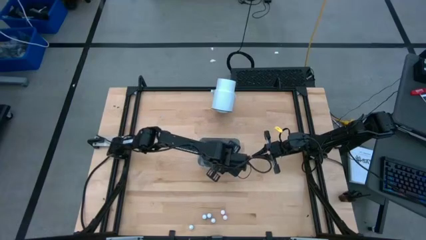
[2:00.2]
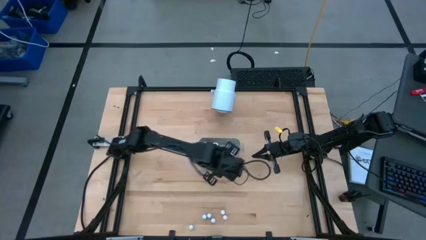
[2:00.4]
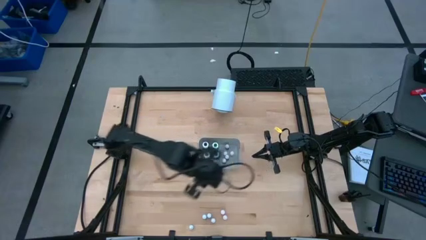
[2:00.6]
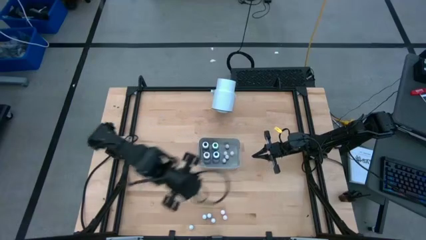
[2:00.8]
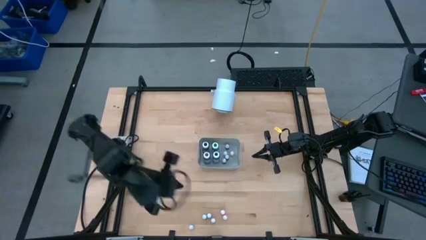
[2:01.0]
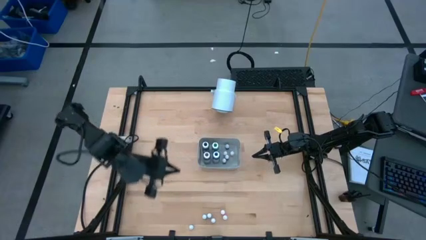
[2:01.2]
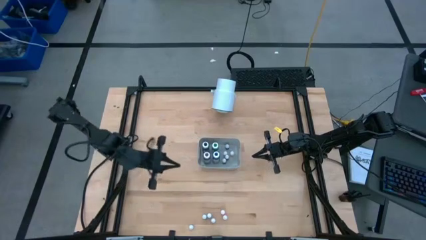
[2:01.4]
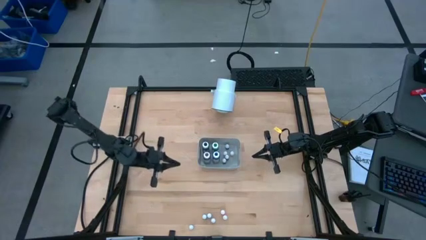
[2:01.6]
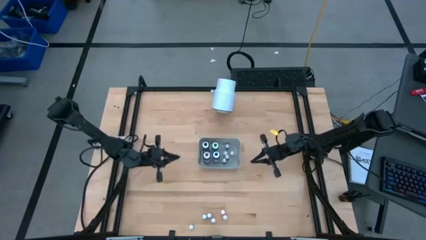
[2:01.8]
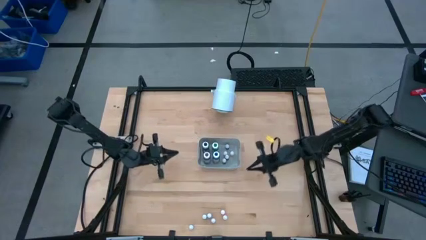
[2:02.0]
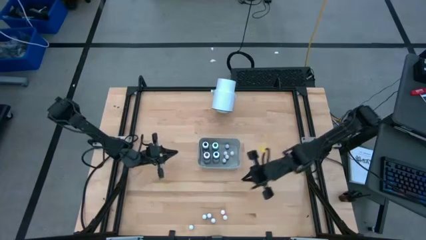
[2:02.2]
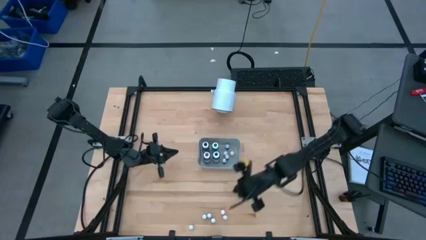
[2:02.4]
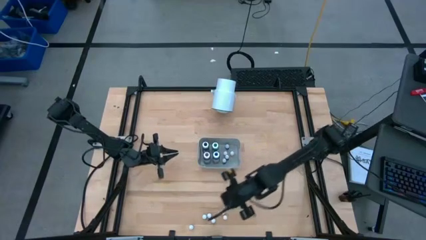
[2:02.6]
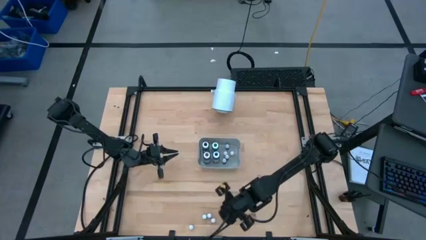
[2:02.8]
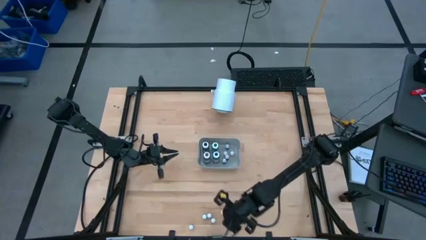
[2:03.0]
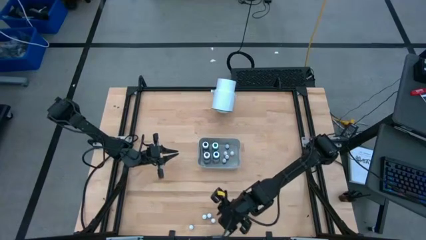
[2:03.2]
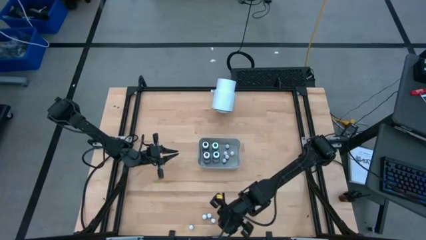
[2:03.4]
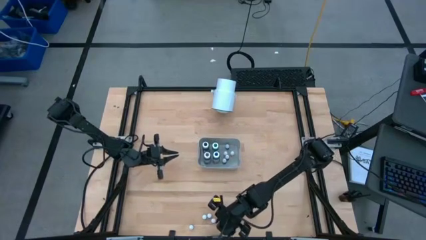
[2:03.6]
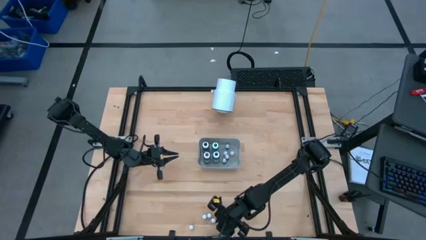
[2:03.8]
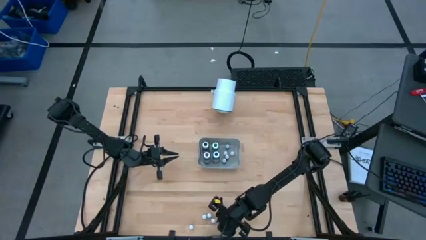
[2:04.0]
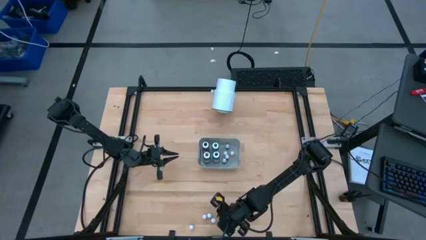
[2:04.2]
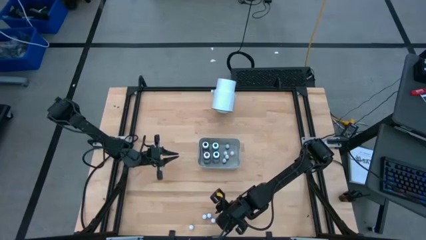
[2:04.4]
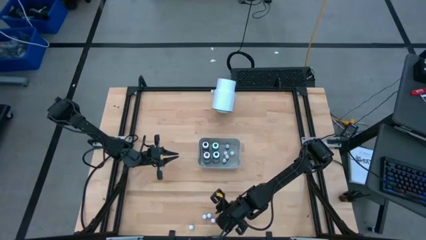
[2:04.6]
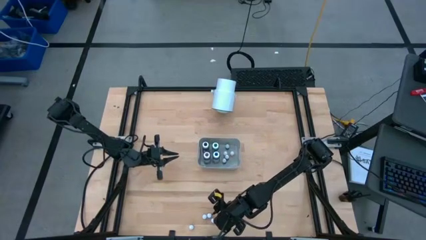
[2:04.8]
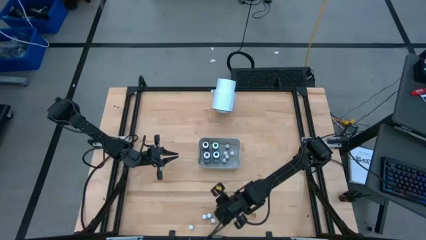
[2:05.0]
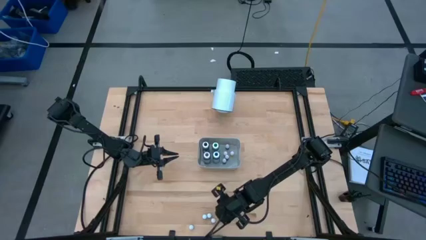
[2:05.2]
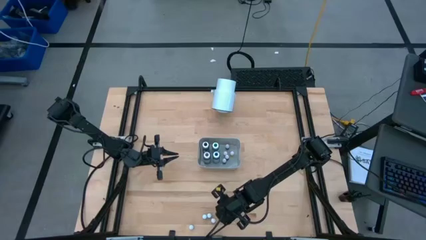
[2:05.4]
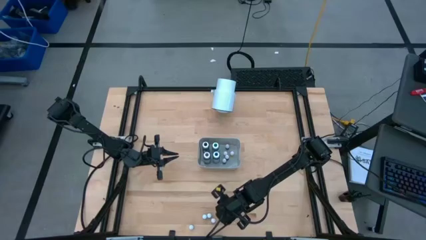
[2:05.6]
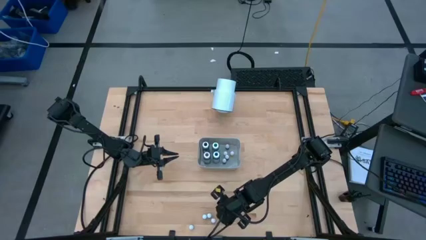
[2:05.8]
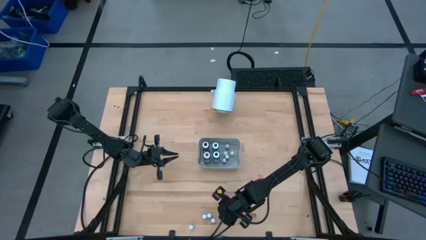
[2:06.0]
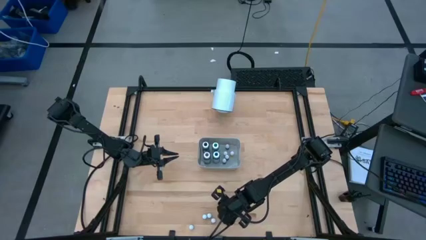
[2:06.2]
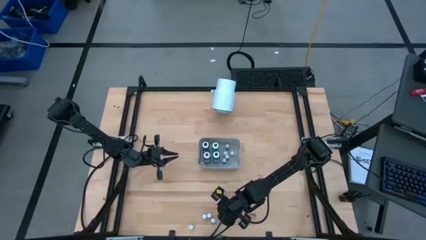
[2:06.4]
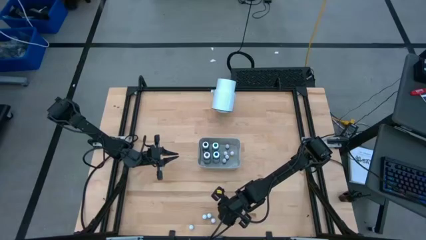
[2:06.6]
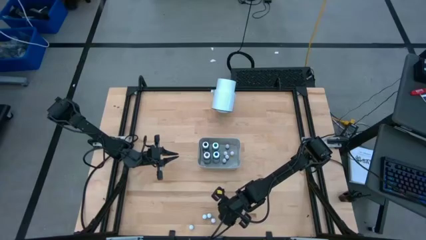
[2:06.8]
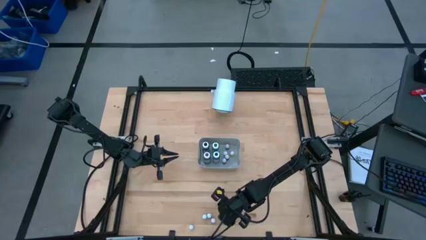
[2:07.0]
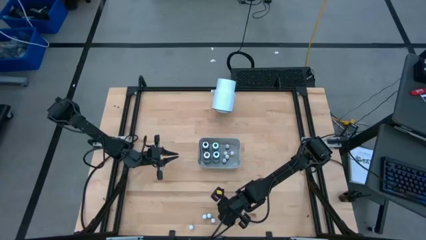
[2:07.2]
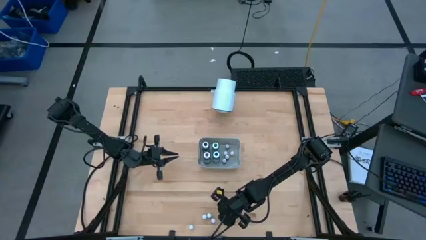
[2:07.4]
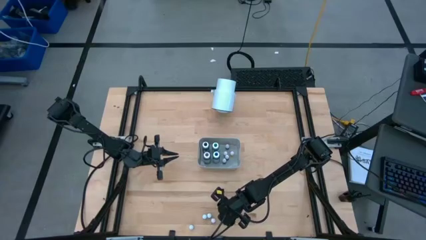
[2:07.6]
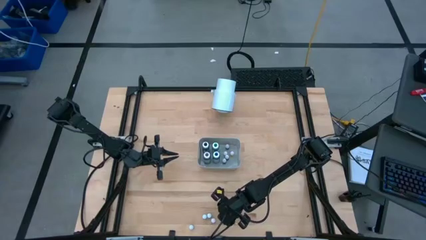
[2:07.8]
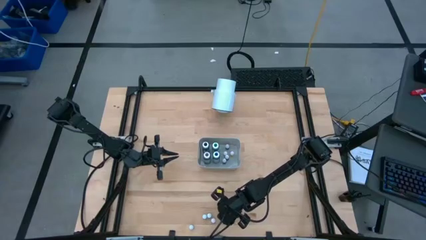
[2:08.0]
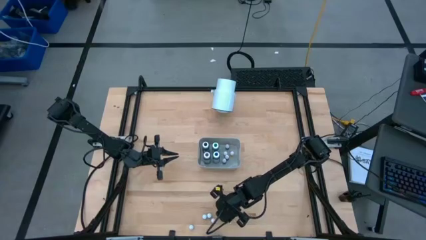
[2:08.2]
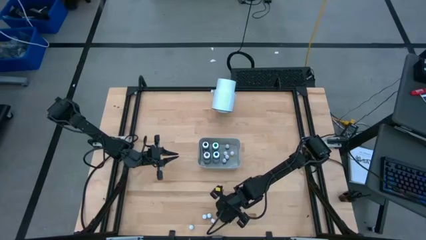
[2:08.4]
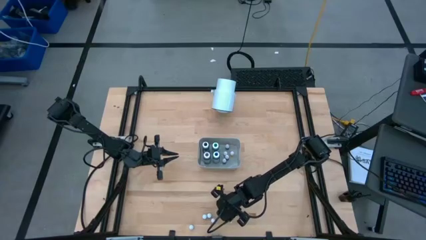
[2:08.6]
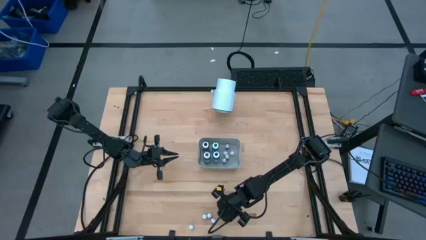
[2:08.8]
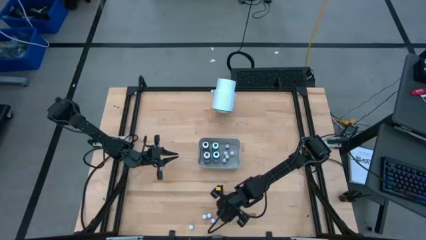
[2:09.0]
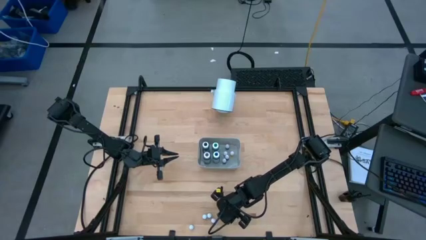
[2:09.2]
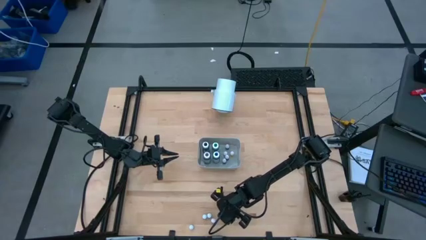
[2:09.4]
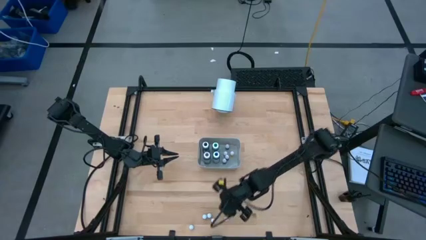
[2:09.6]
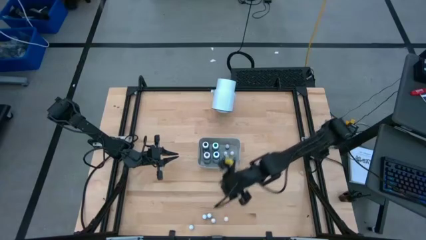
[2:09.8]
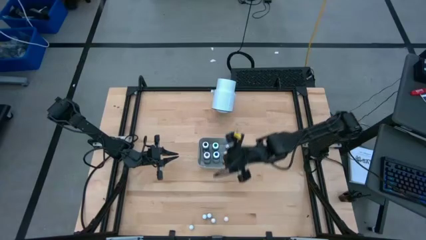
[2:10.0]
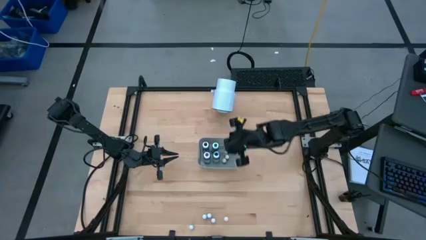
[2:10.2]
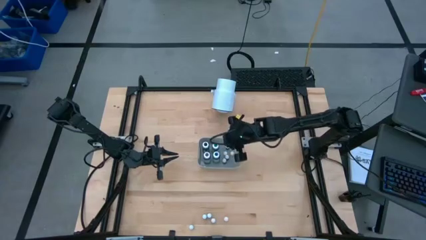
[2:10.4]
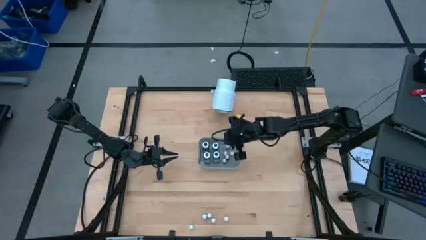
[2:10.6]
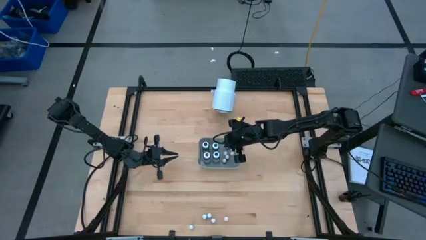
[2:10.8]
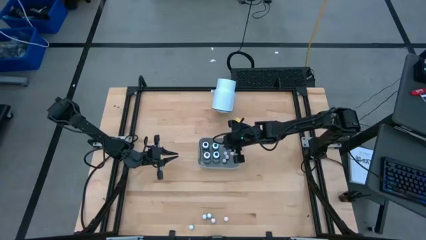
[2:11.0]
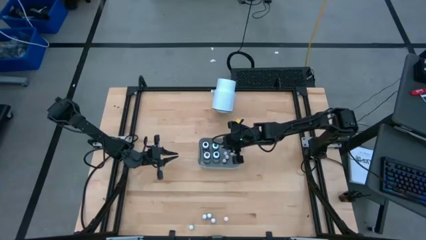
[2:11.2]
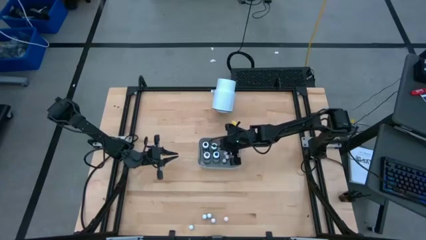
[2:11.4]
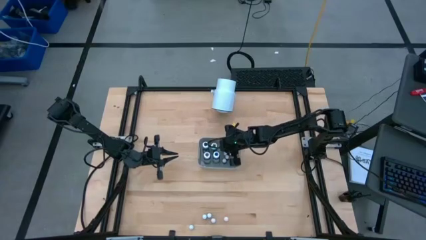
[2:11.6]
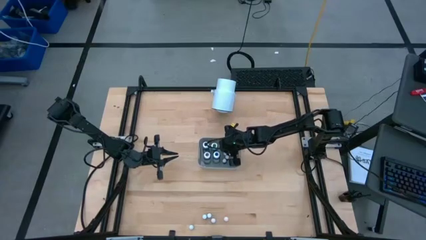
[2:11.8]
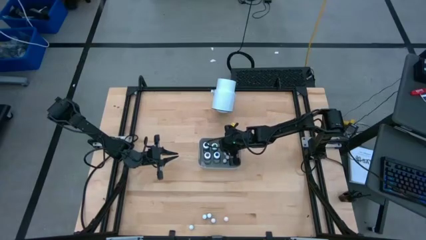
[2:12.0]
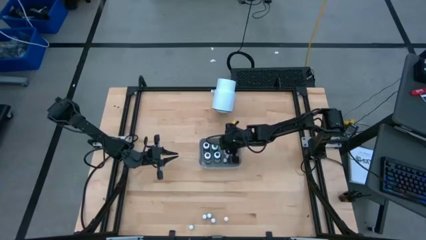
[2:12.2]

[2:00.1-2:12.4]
Task: Pick & Place food coloring
Put the small yellow food coloring bottle into the gray bin

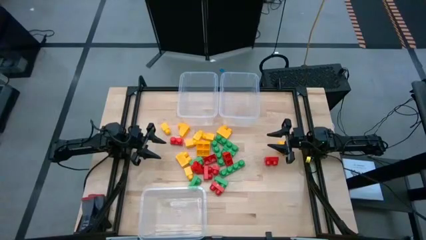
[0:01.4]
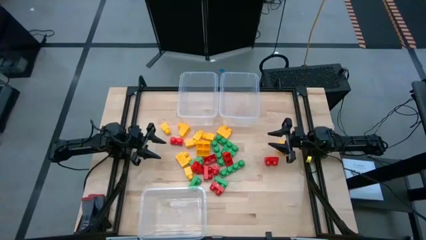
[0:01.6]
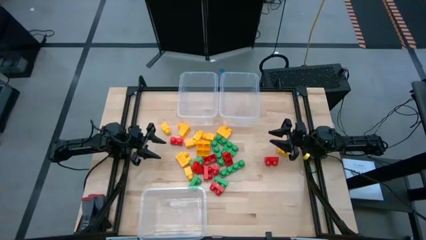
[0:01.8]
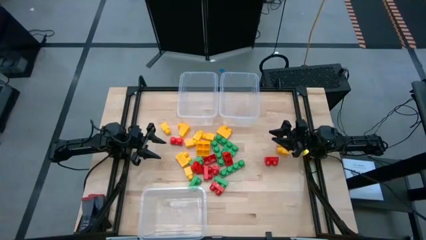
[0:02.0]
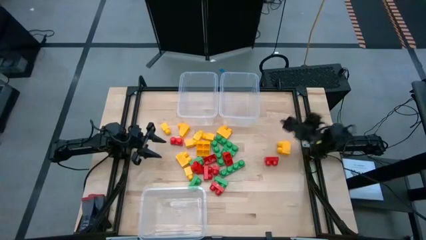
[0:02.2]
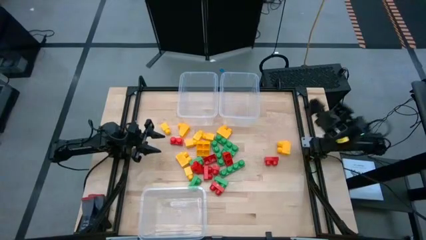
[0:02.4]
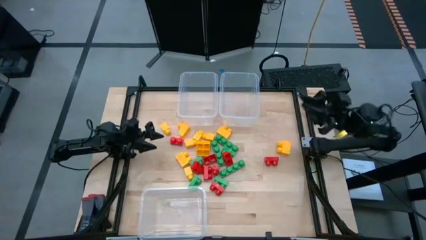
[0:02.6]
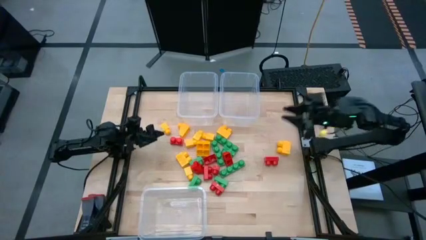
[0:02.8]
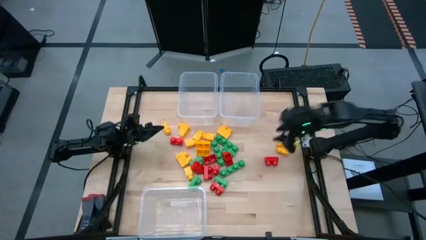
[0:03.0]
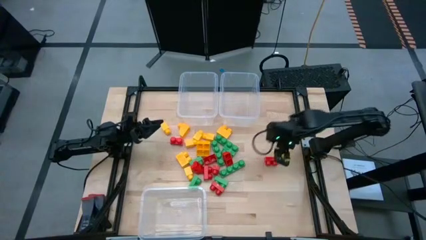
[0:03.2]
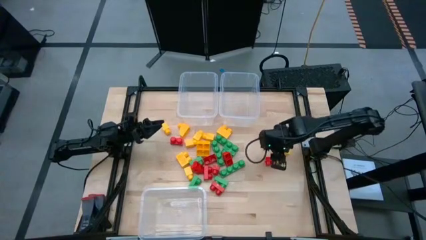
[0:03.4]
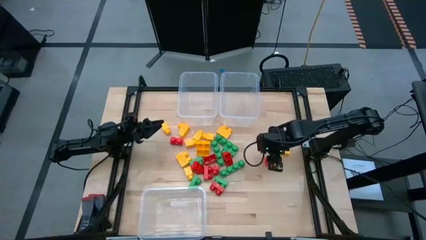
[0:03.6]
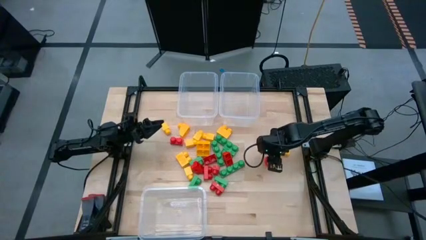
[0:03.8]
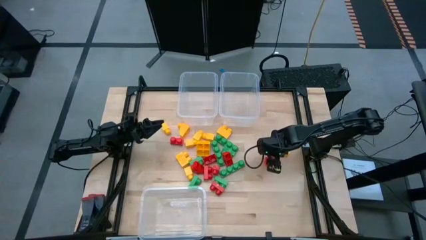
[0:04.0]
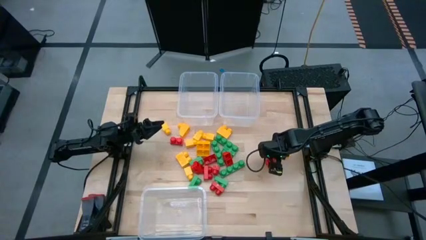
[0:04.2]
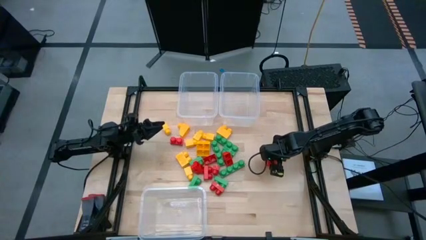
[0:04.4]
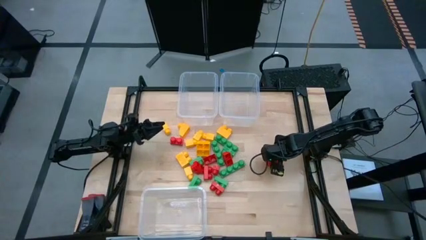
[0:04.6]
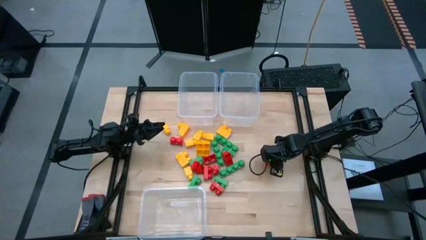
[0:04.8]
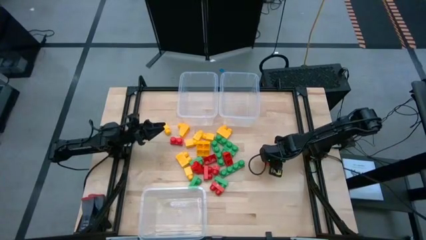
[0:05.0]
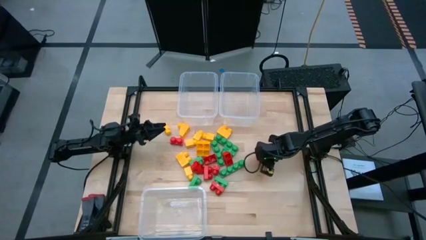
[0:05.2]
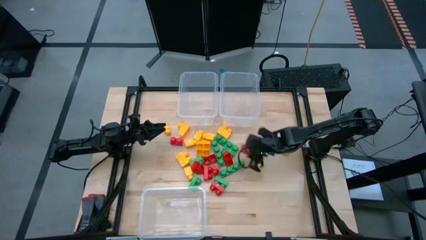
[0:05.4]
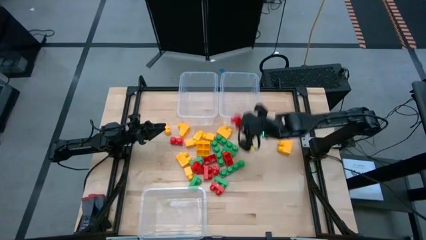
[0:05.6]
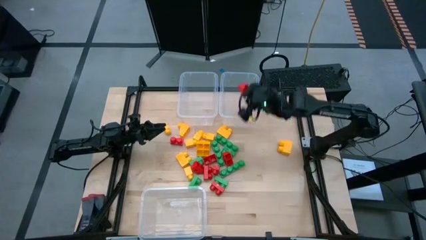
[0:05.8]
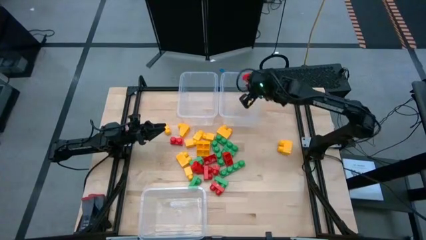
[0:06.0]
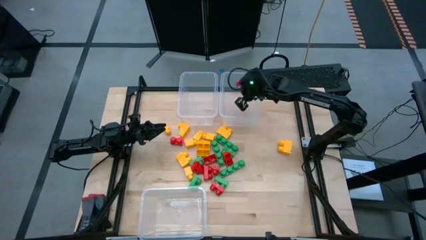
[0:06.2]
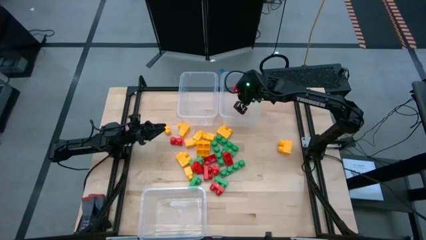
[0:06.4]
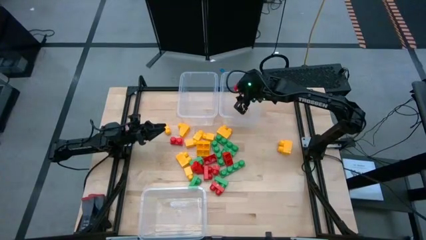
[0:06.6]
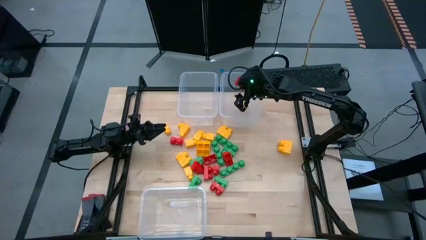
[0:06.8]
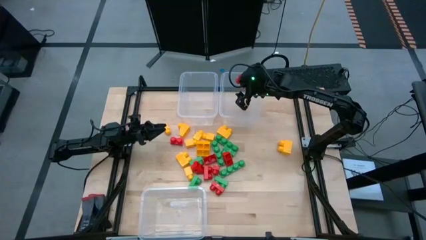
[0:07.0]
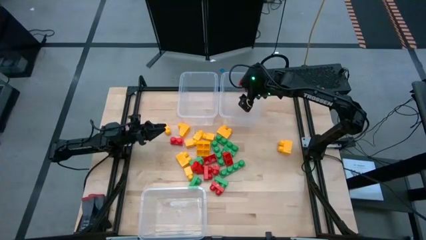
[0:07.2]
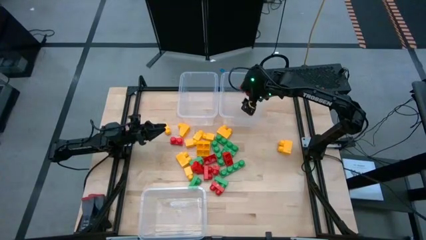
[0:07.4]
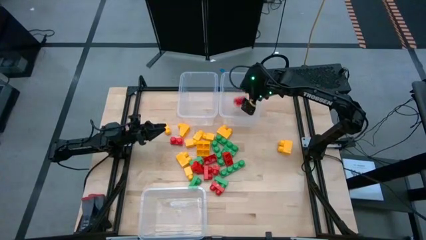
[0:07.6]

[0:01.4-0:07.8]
Task: Sort blocks
Put the red game piece into the top right transparent bin
